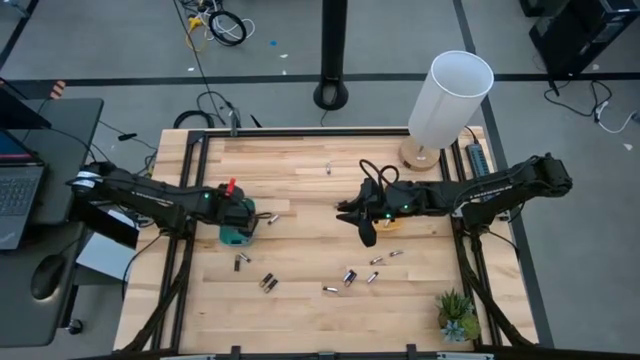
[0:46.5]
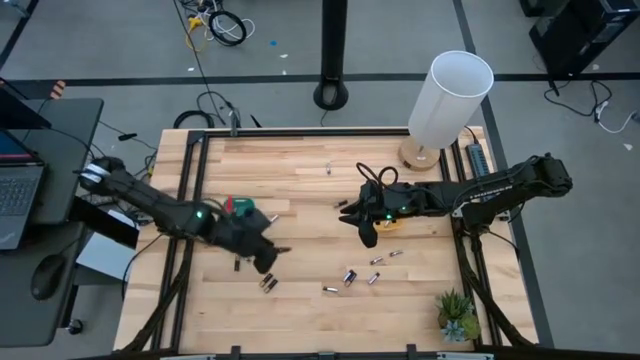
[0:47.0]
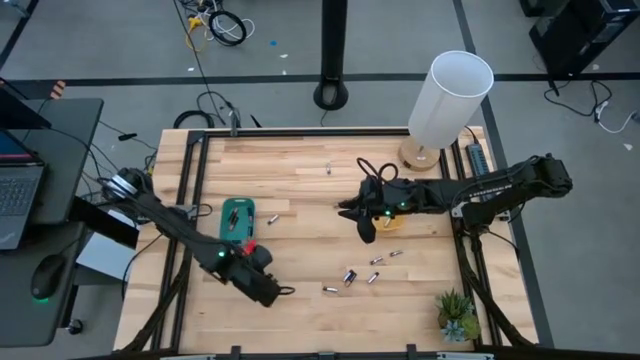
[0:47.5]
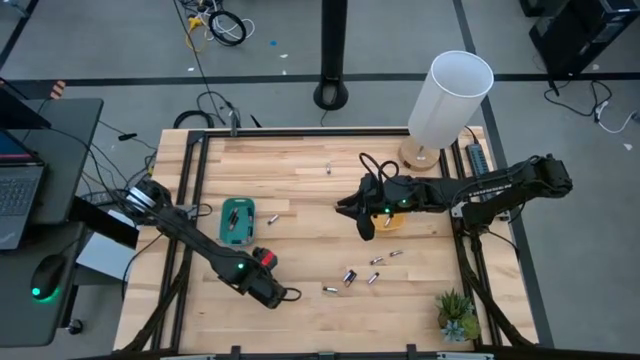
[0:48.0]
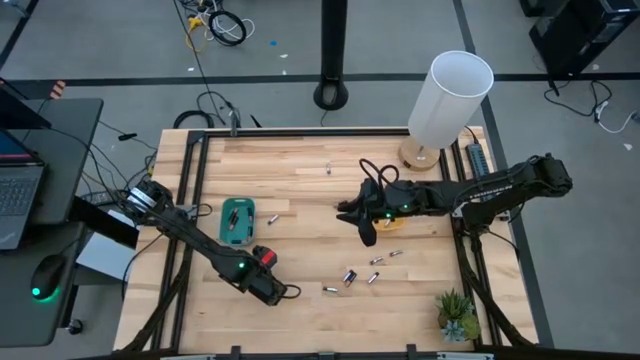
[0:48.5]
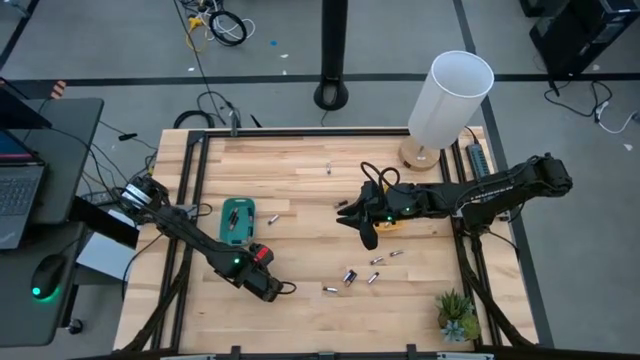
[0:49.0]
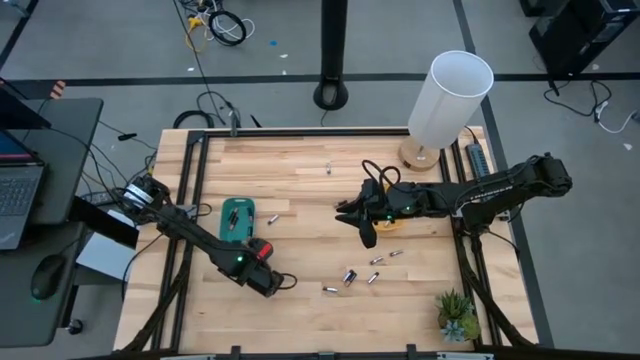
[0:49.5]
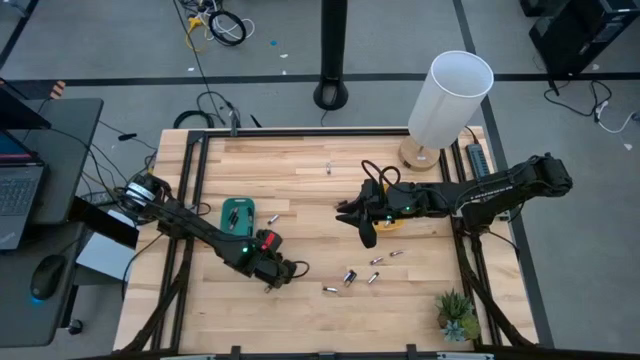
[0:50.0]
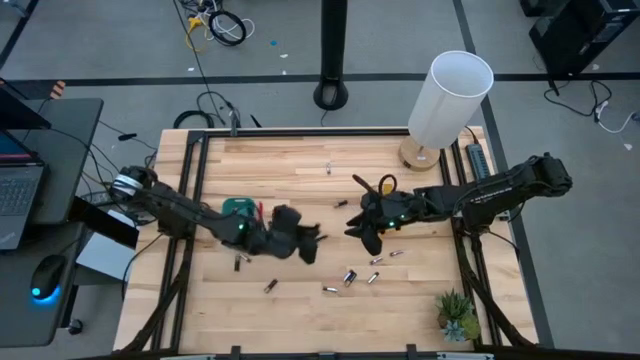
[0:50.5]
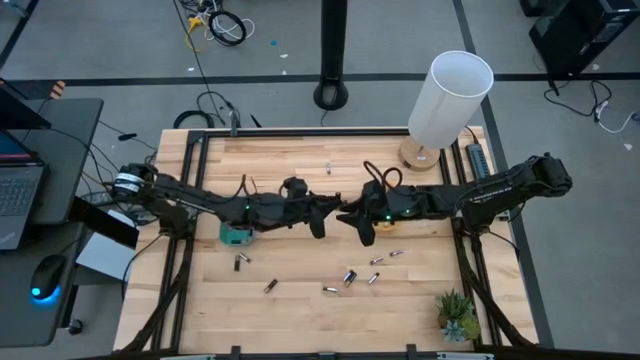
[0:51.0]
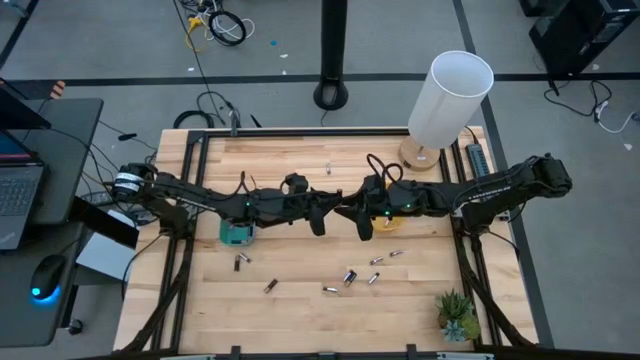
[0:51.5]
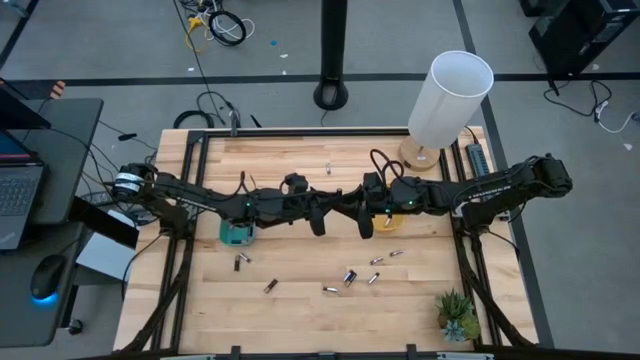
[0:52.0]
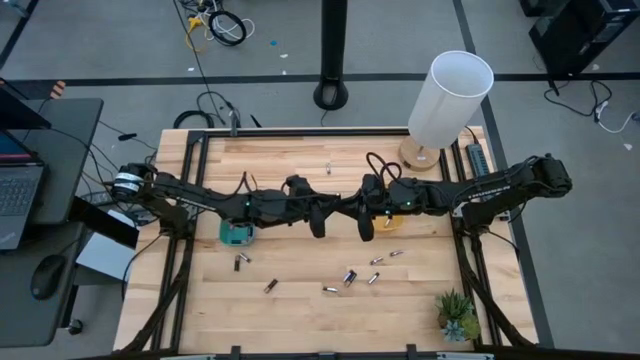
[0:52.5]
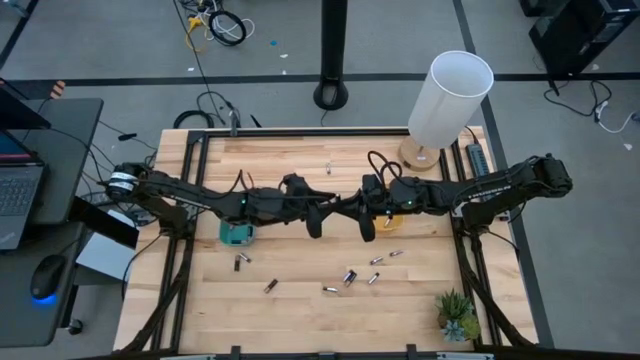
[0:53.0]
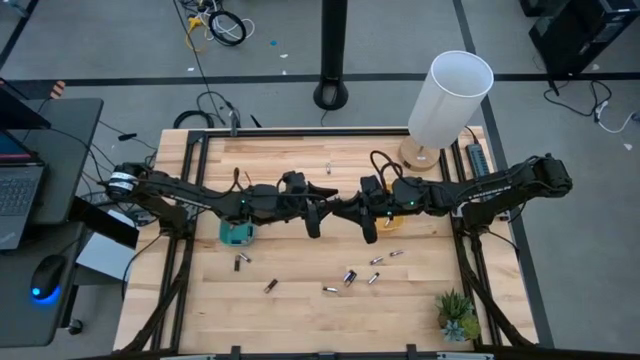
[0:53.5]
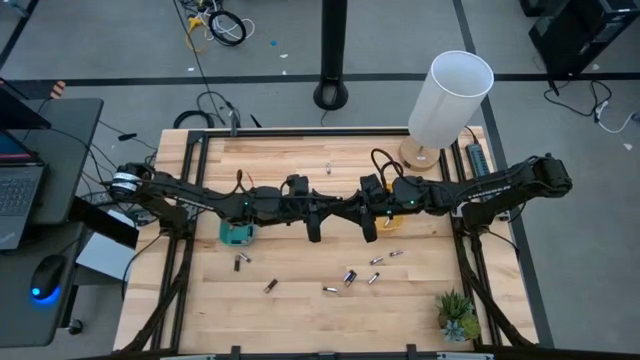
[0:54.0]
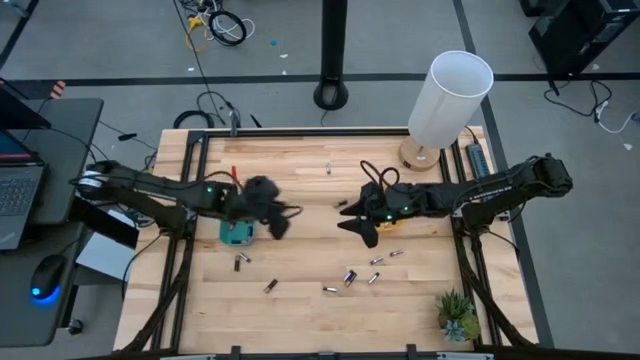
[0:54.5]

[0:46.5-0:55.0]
Task: Sort batteries
Put the black battery into the green bin

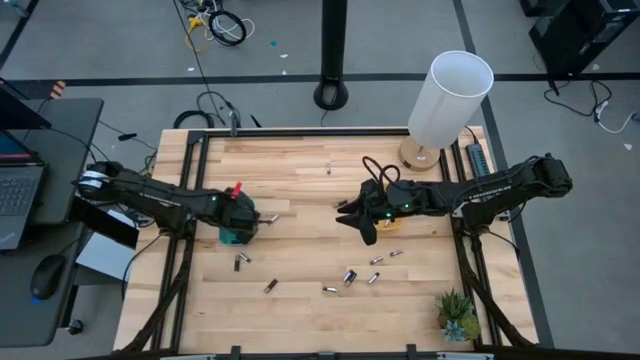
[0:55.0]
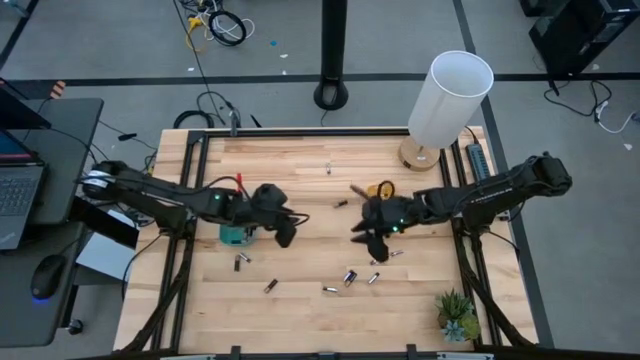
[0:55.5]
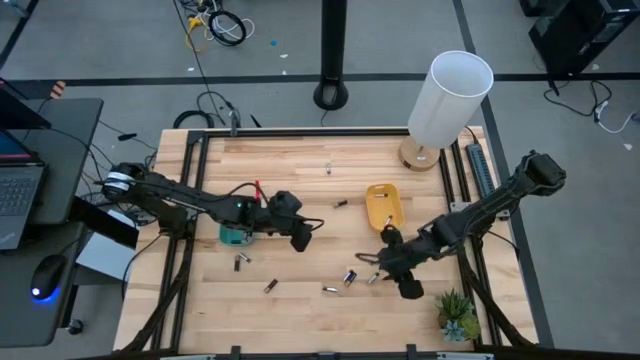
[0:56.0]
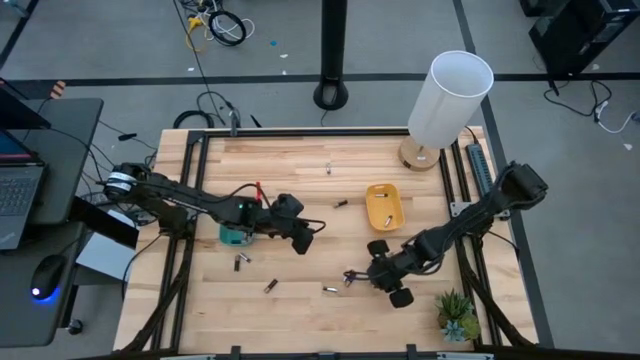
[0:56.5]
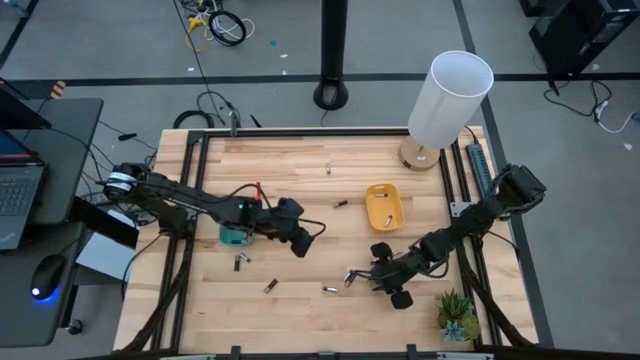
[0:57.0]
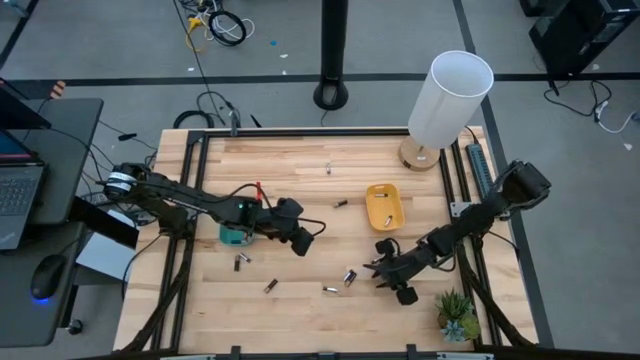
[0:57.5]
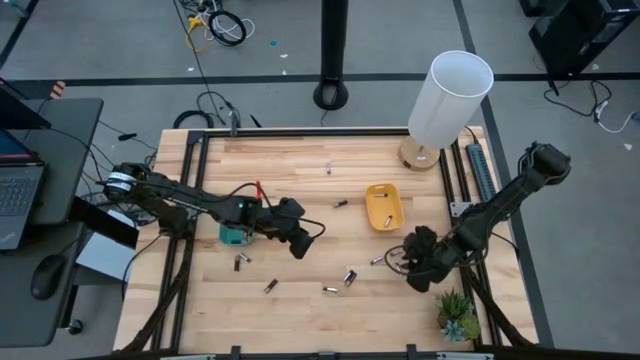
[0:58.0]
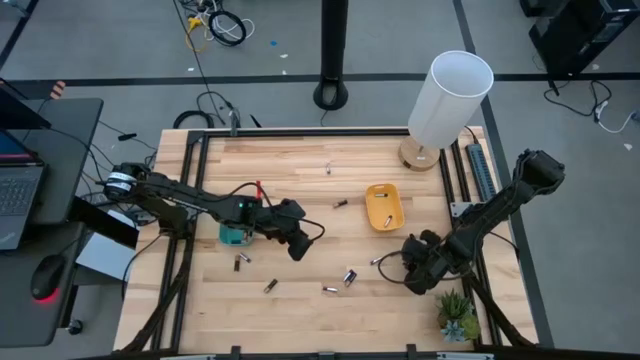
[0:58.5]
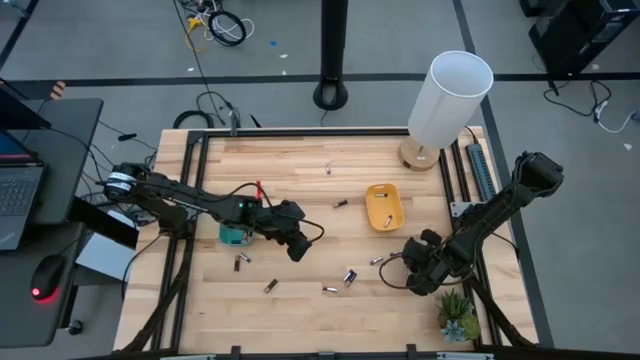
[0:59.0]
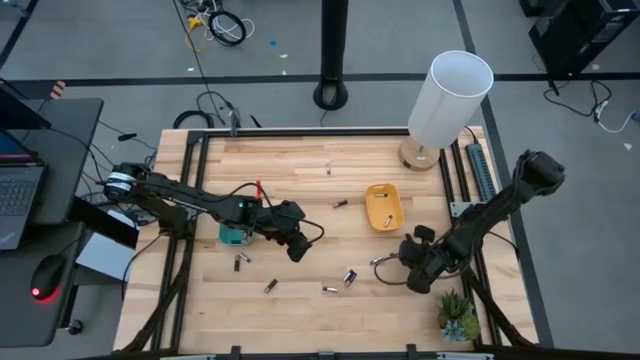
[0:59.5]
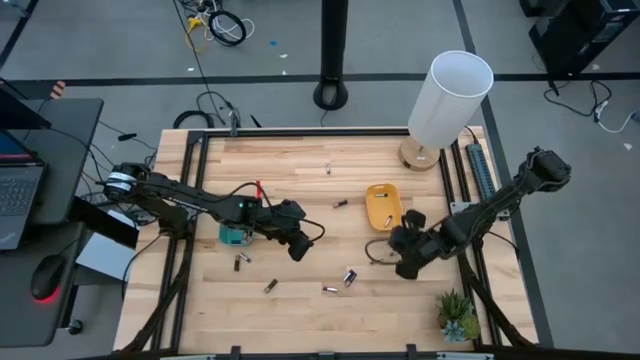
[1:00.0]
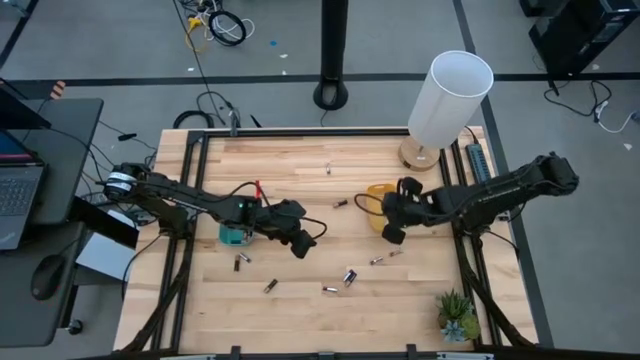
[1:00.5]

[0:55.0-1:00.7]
Put the silver battery into the yellow bin

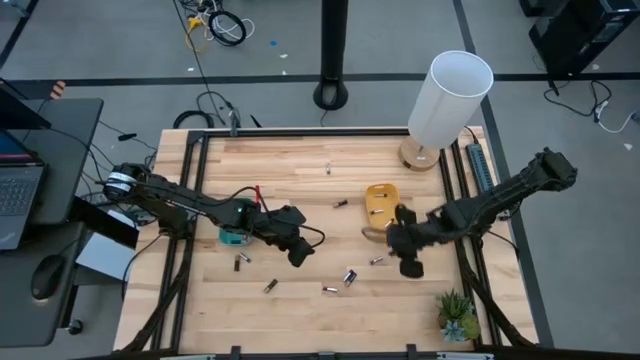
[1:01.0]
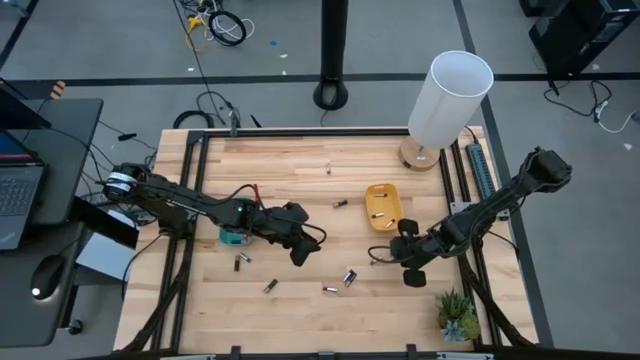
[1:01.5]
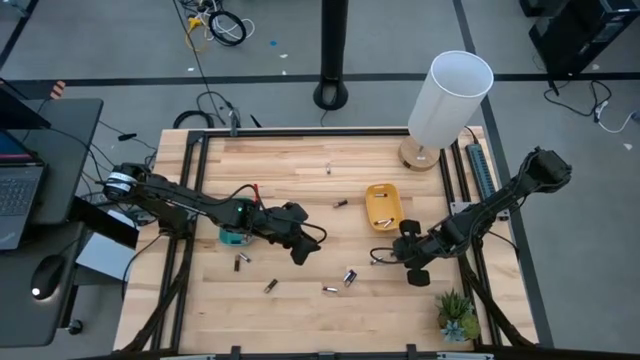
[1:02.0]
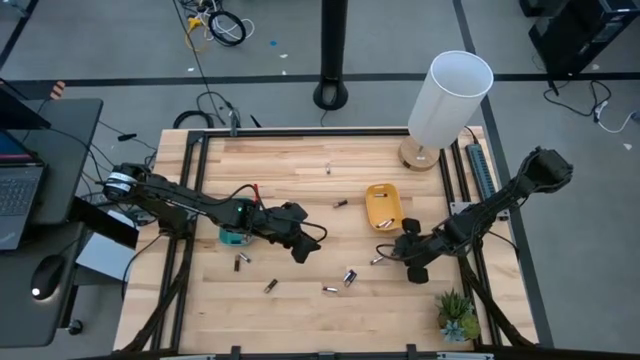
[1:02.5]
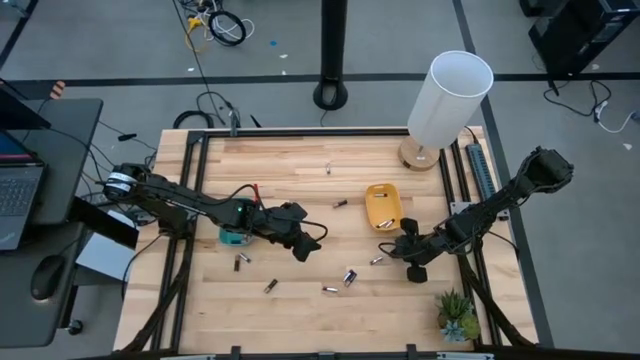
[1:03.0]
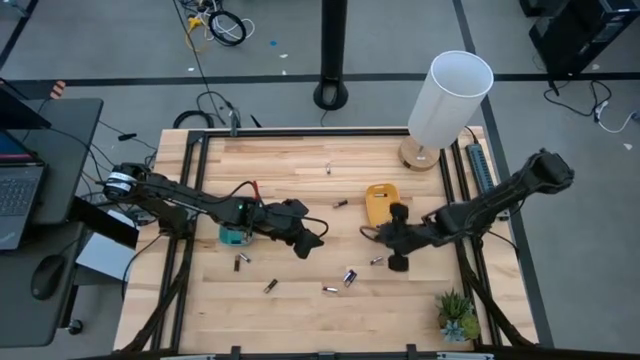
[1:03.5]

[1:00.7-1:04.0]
Put the silver battery into the yellow bin

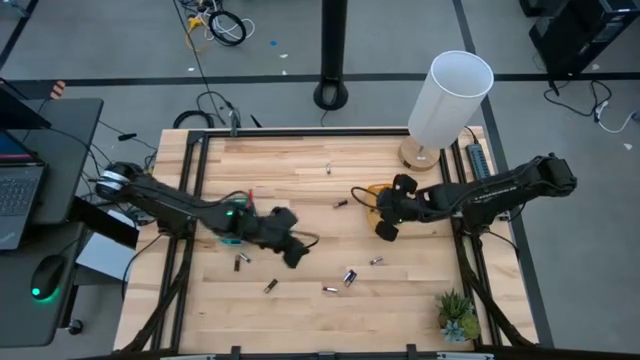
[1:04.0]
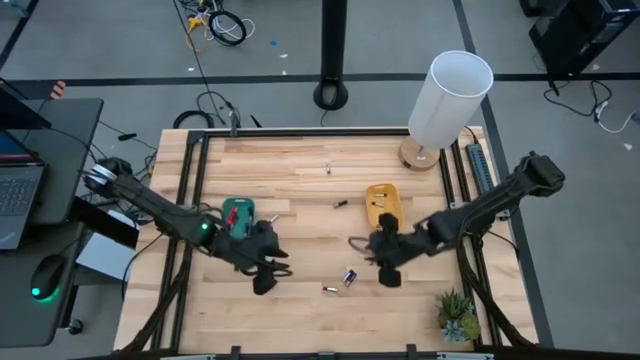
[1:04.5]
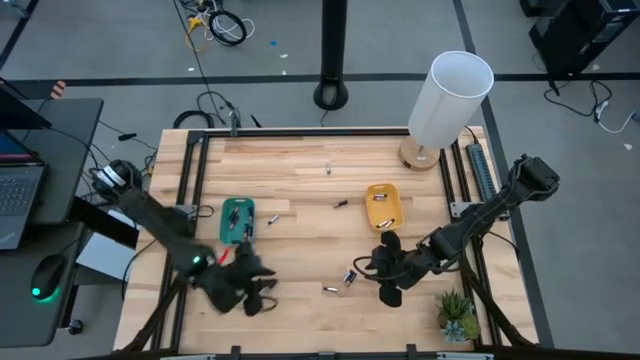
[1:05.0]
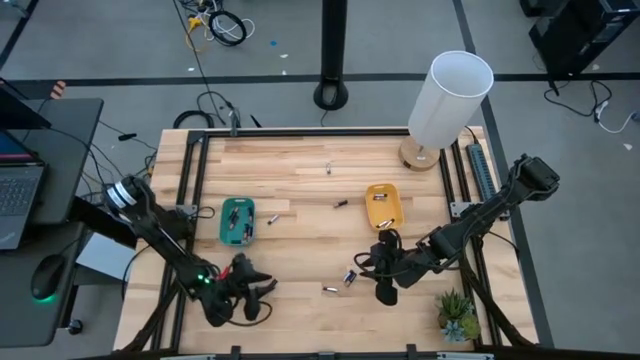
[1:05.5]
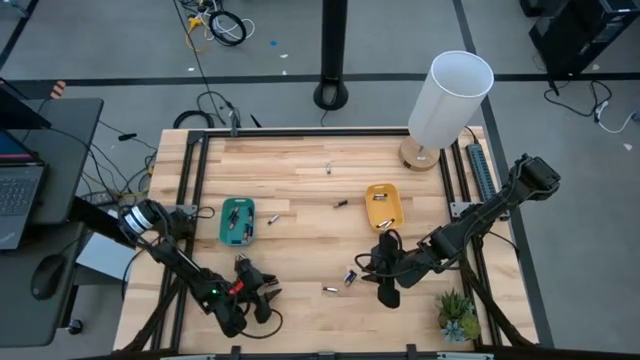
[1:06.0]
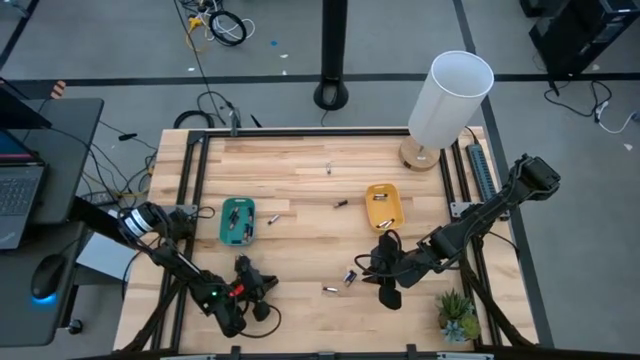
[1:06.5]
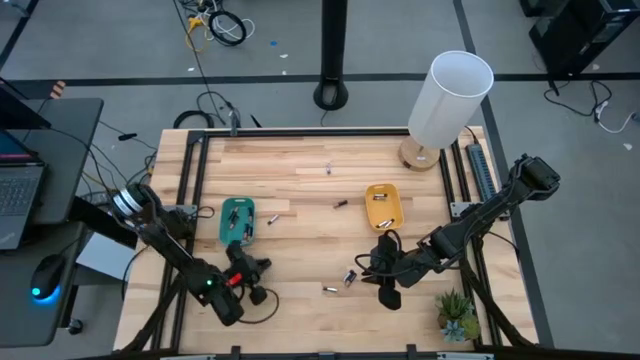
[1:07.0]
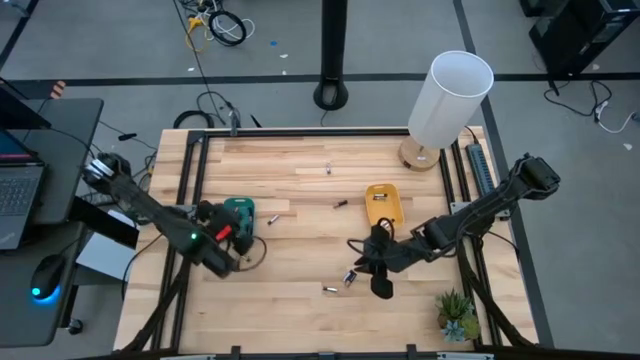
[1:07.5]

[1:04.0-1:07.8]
Put the black battery into the green bin
